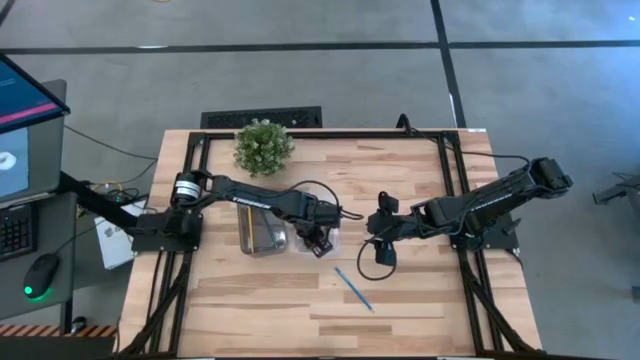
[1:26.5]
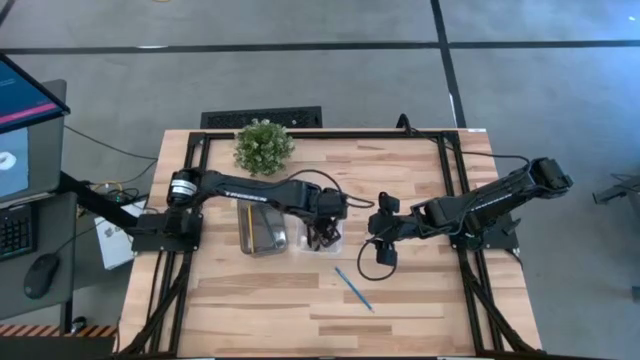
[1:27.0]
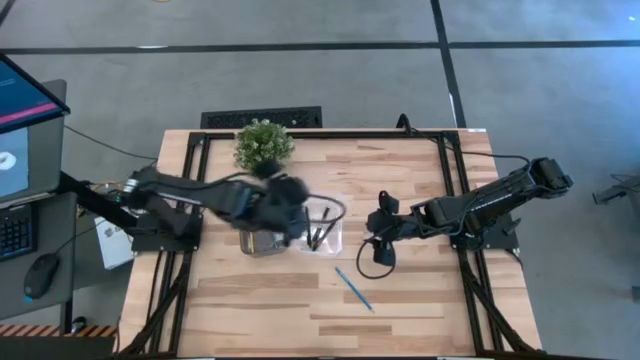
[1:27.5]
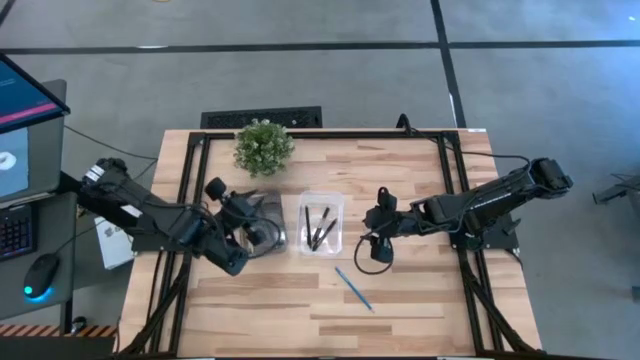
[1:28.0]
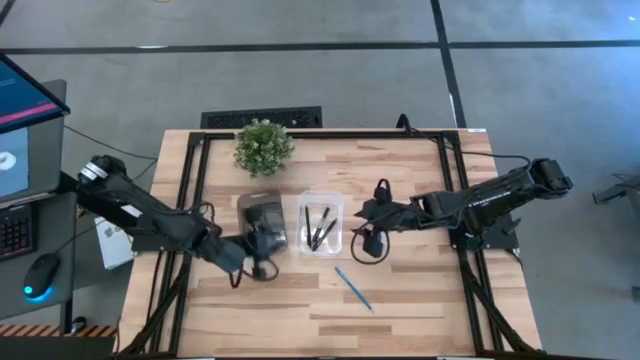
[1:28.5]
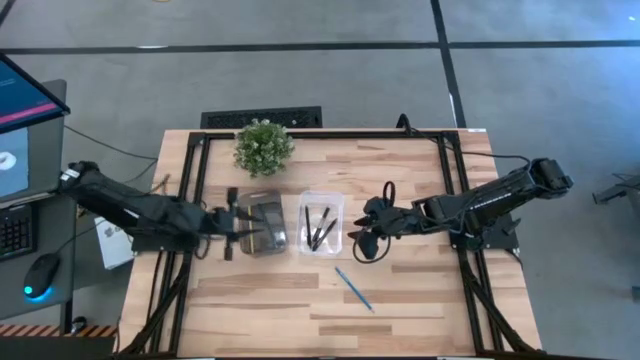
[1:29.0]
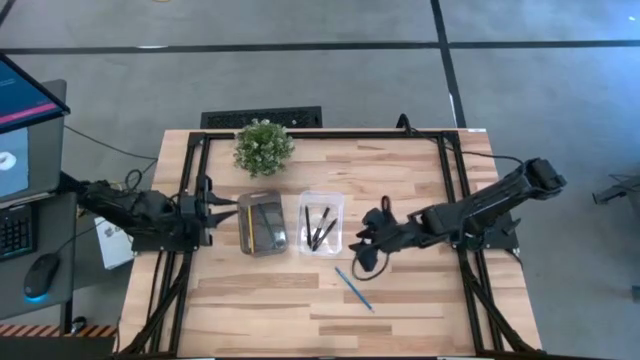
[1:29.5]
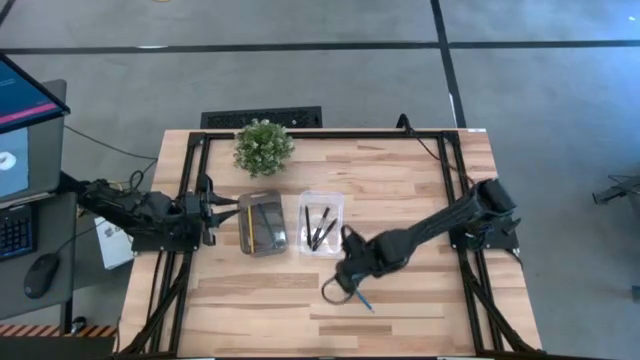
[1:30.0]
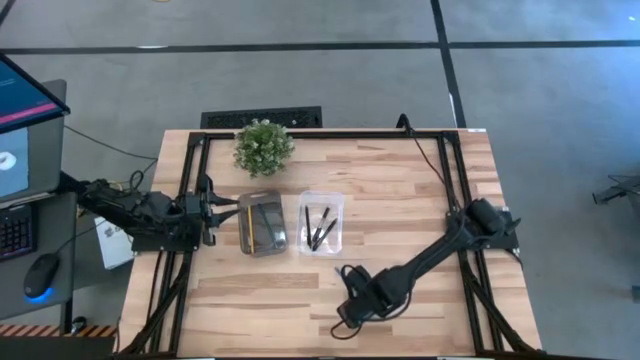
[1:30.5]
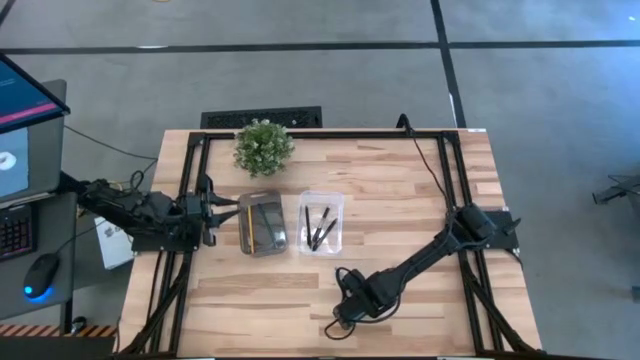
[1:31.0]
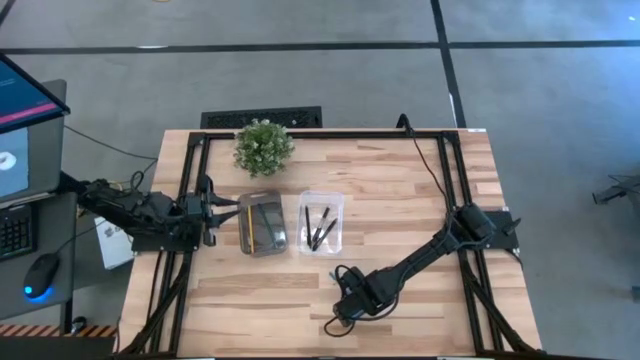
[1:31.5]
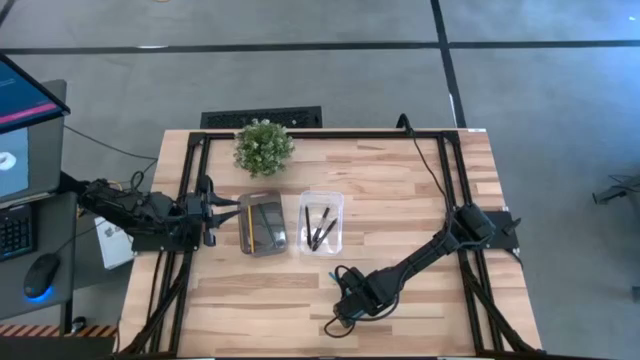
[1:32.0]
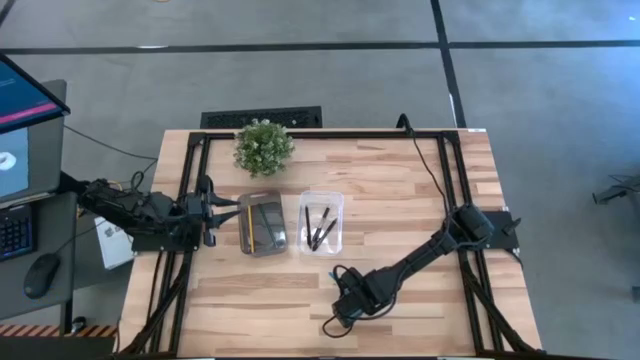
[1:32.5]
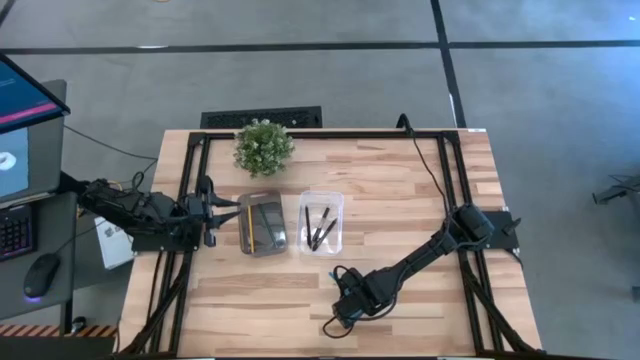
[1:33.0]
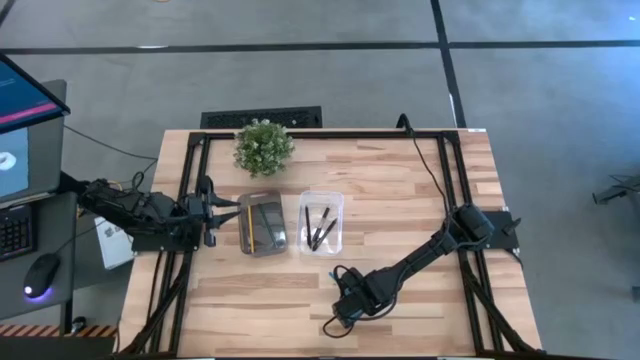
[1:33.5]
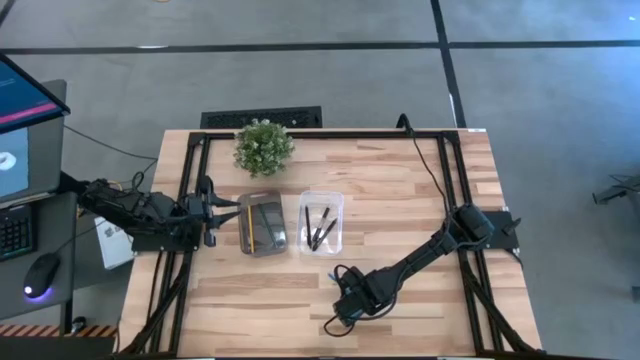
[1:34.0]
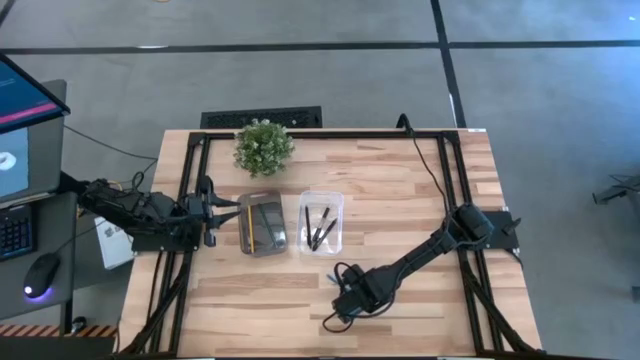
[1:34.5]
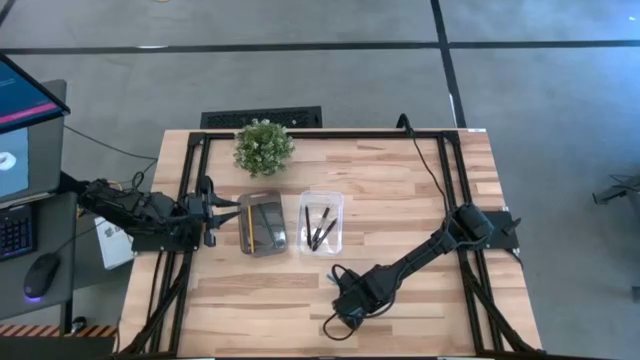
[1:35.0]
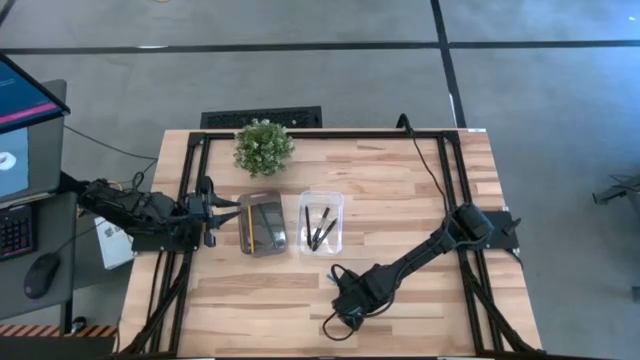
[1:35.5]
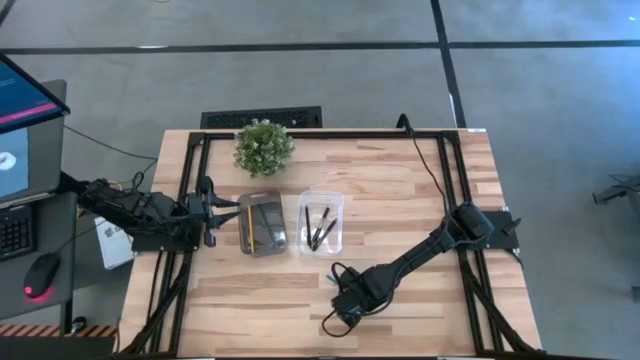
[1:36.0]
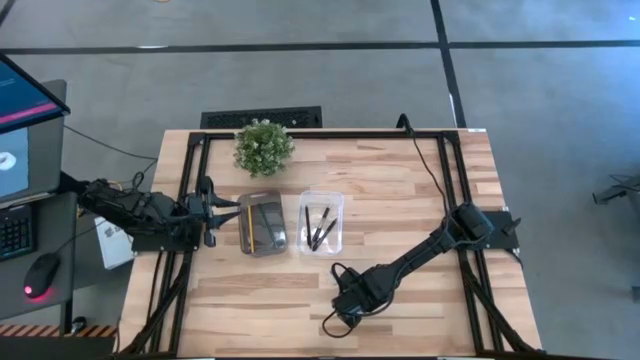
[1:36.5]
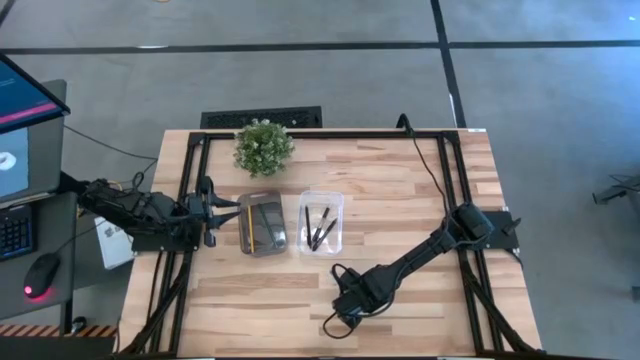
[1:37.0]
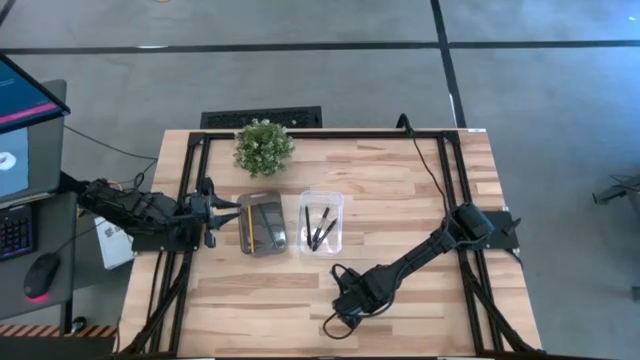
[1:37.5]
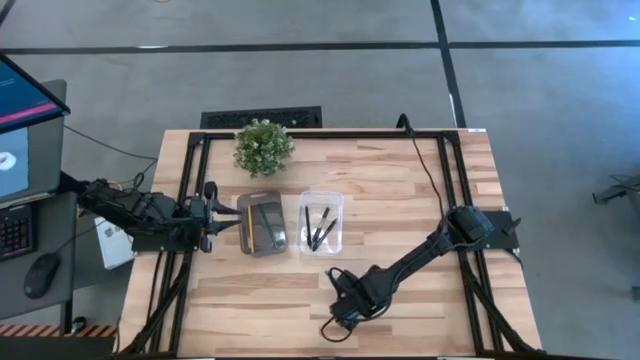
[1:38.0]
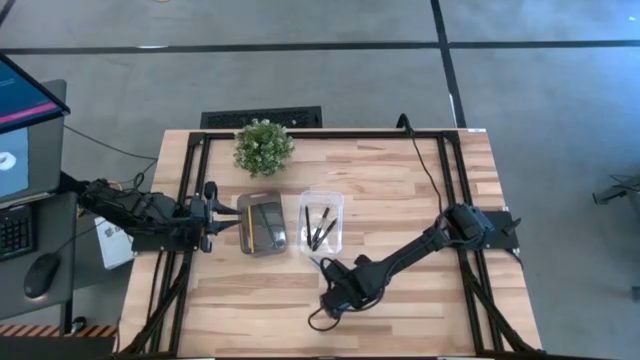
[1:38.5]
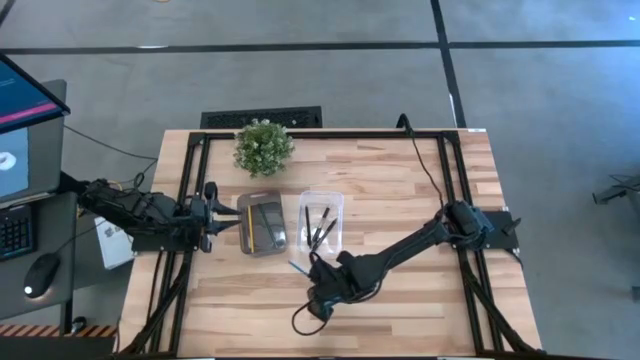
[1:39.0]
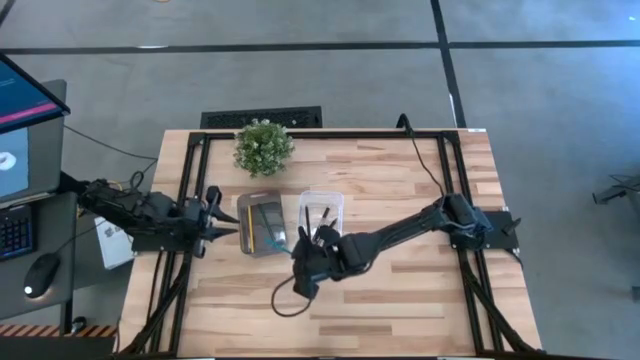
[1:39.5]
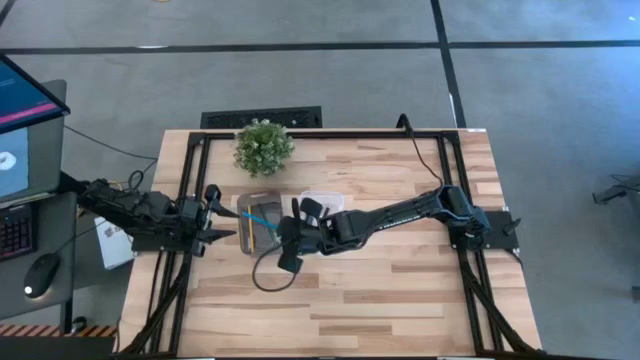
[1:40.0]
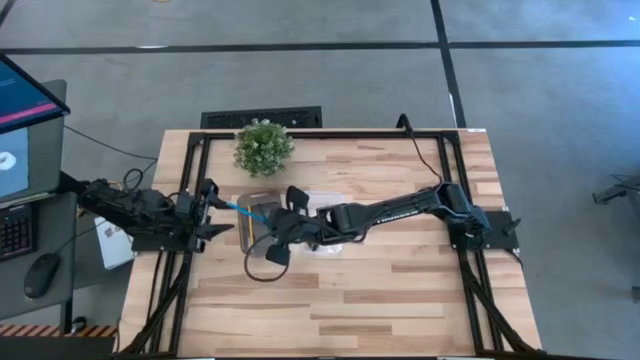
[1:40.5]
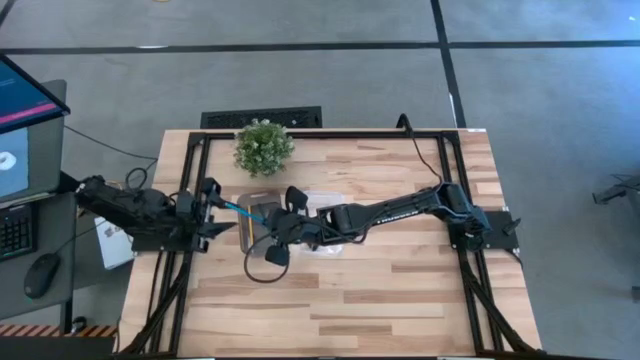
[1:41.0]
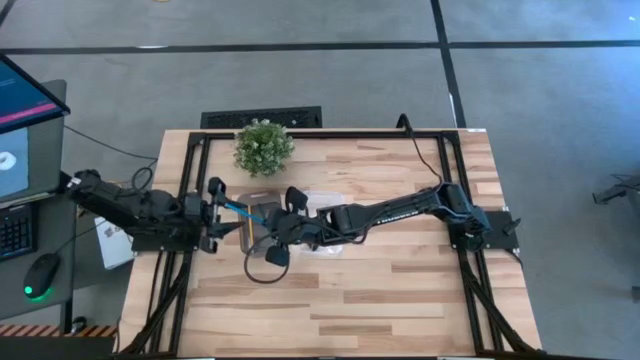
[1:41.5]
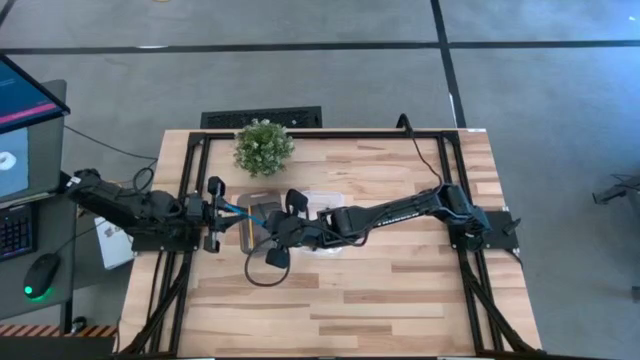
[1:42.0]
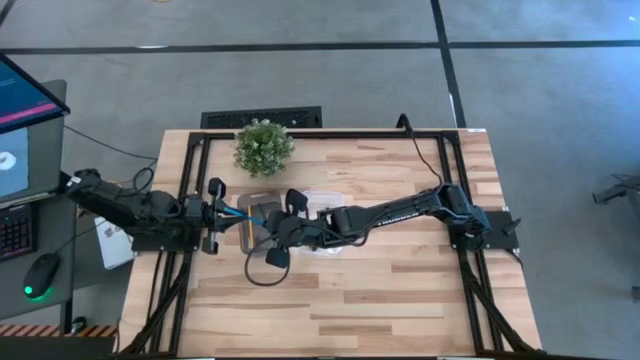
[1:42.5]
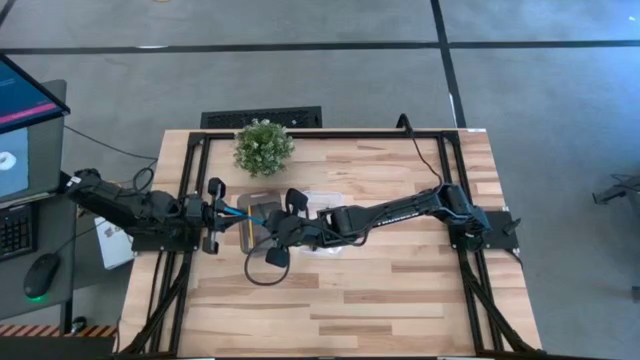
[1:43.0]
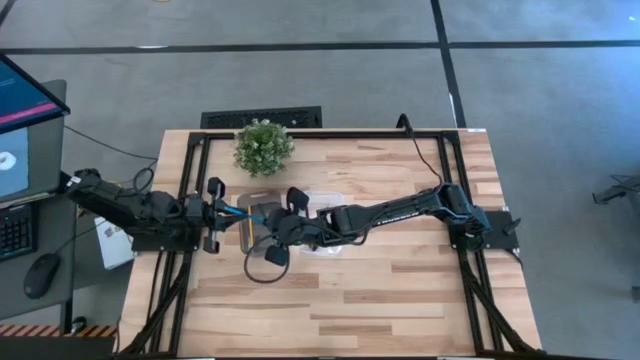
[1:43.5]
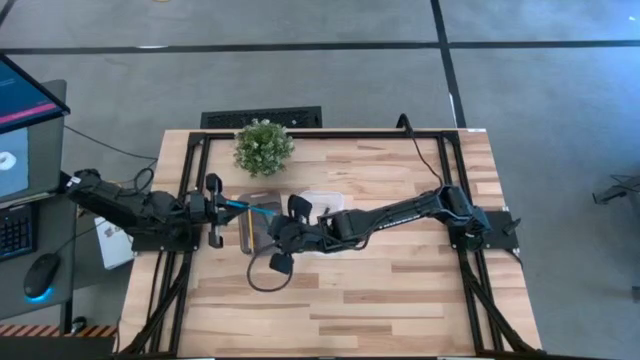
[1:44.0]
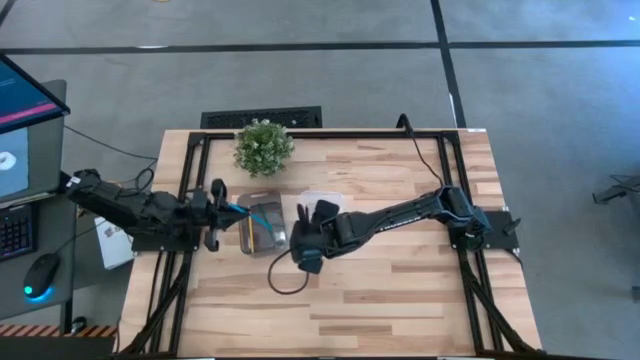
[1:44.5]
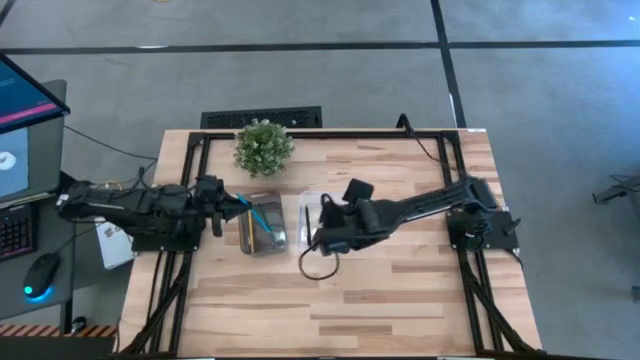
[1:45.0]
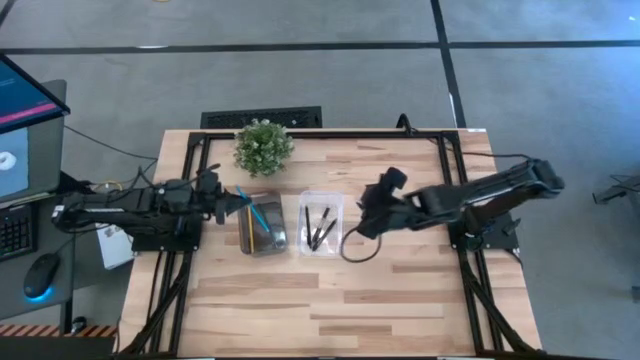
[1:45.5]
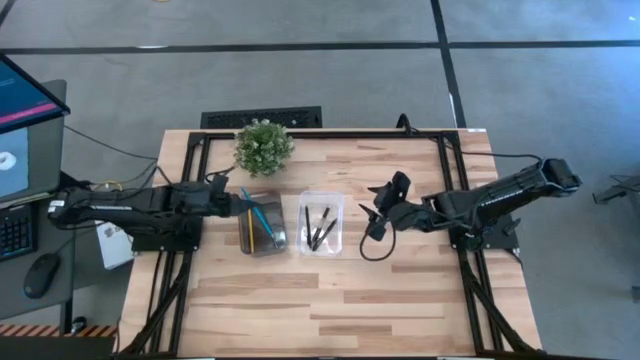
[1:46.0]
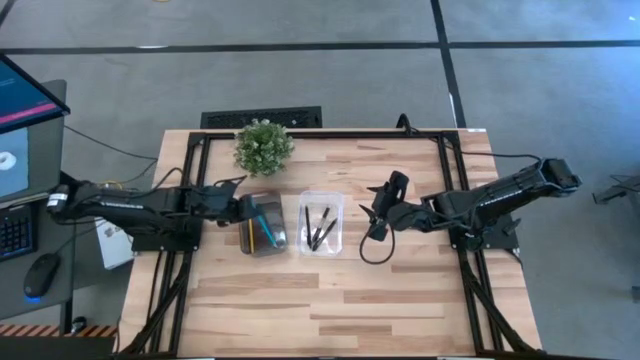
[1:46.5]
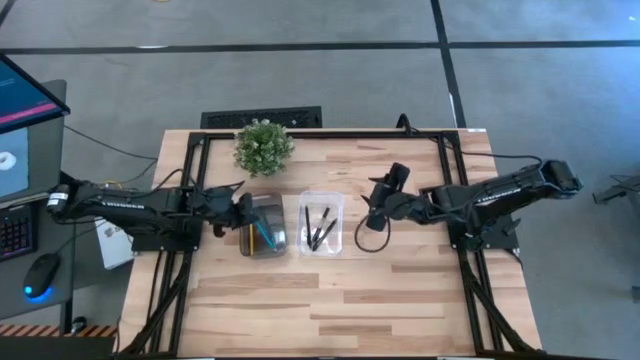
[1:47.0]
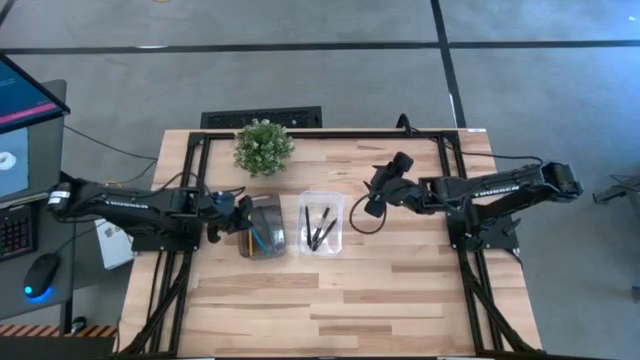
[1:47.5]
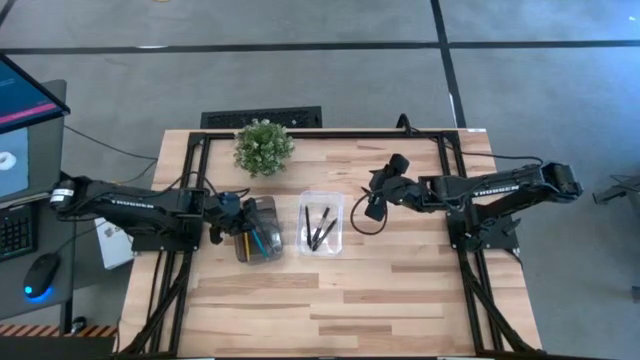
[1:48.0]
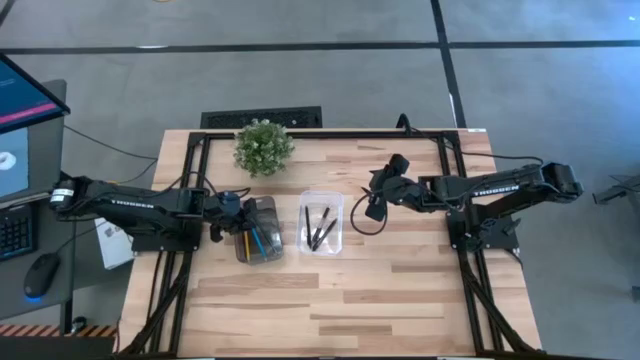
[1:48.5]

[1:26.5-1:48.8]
Task: Sort pens & pencils
Put the blue pencil into the black bin
